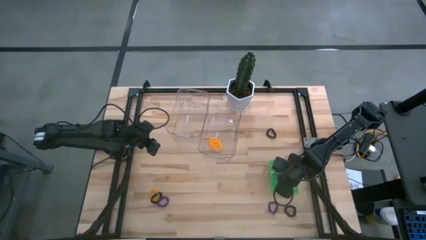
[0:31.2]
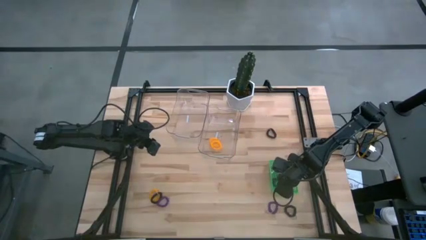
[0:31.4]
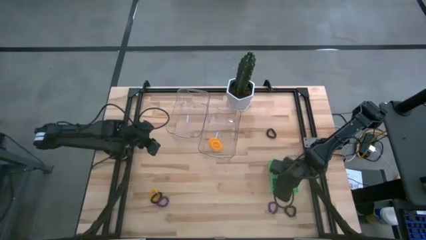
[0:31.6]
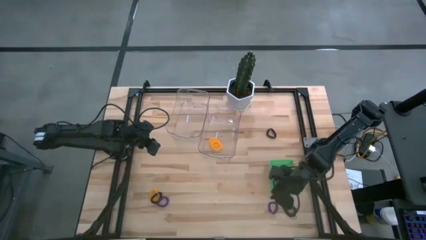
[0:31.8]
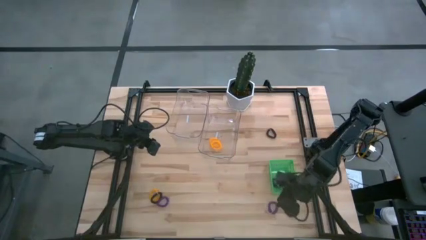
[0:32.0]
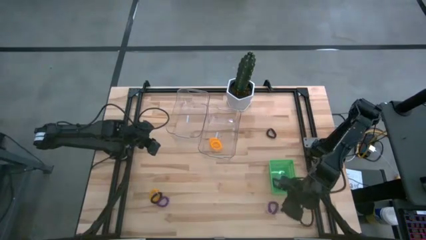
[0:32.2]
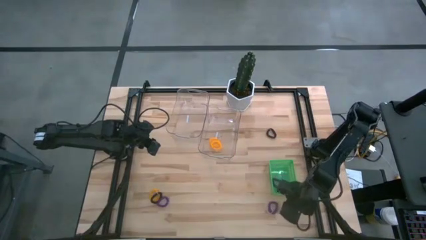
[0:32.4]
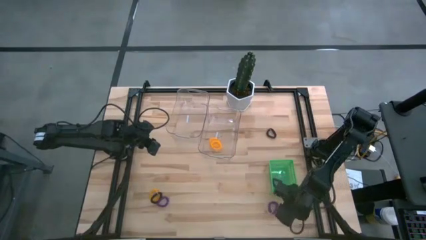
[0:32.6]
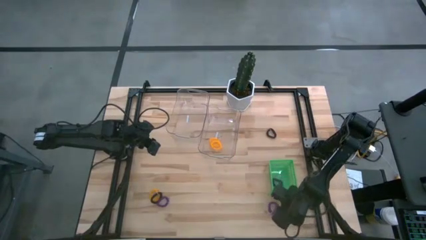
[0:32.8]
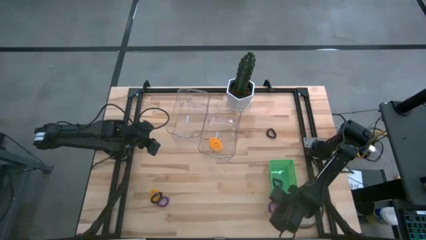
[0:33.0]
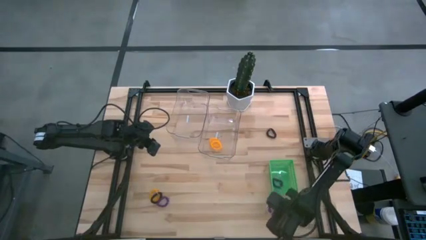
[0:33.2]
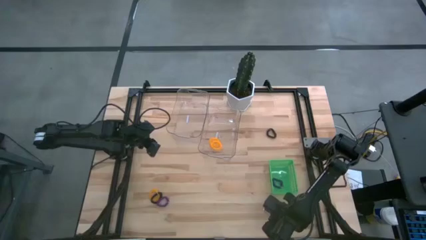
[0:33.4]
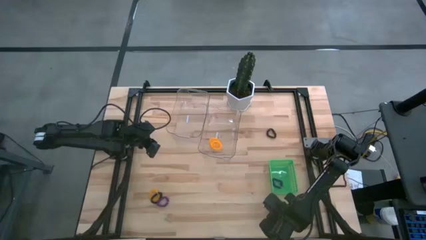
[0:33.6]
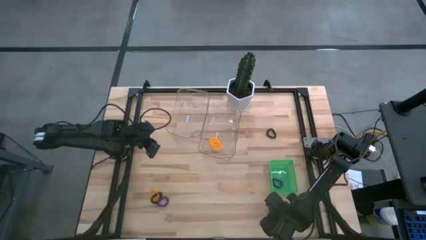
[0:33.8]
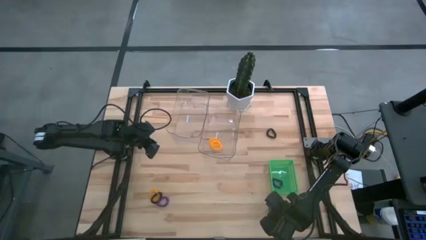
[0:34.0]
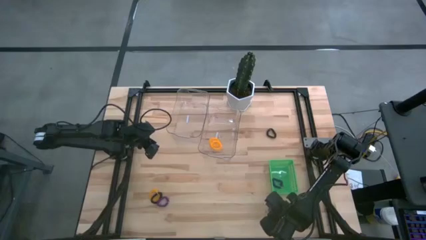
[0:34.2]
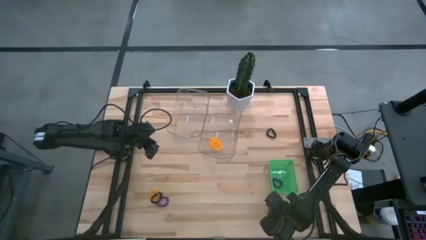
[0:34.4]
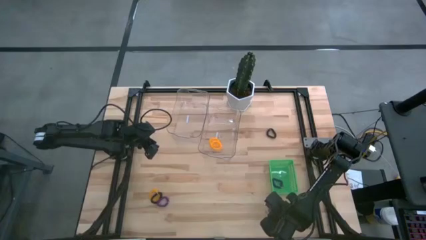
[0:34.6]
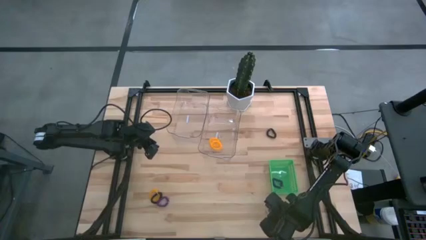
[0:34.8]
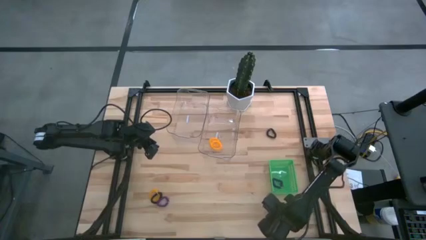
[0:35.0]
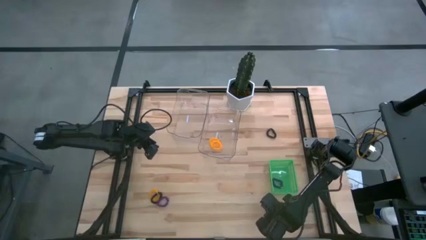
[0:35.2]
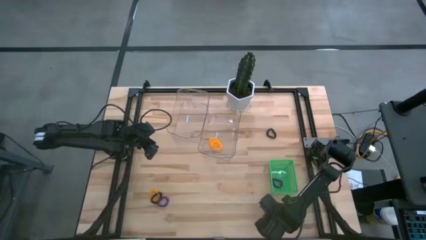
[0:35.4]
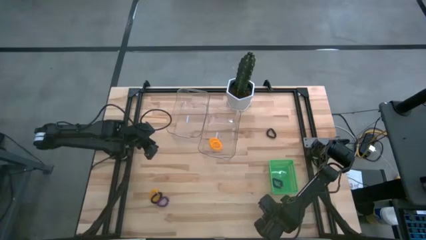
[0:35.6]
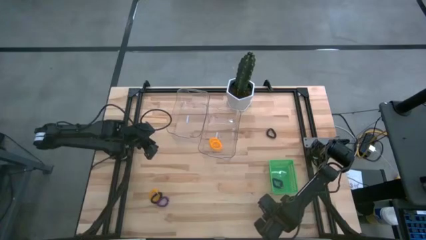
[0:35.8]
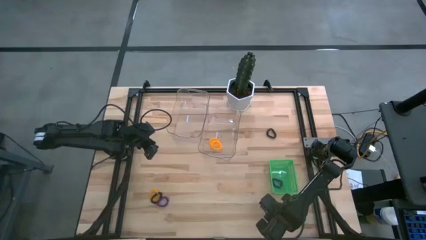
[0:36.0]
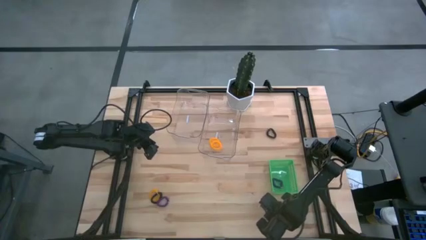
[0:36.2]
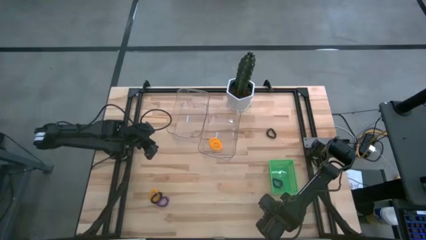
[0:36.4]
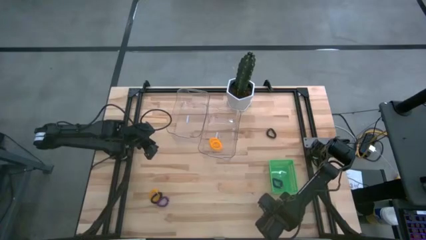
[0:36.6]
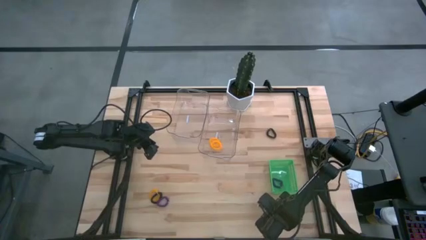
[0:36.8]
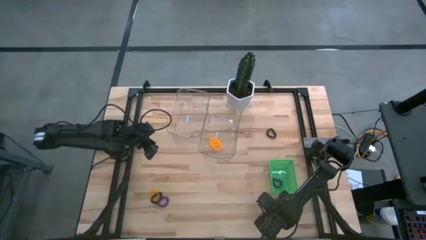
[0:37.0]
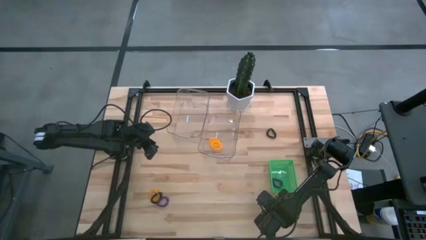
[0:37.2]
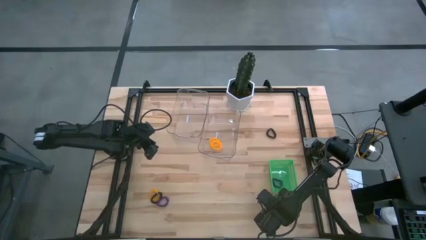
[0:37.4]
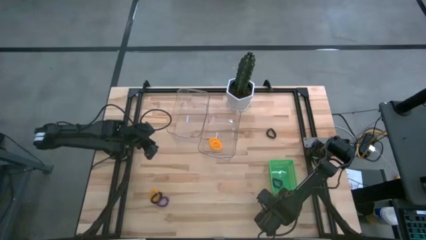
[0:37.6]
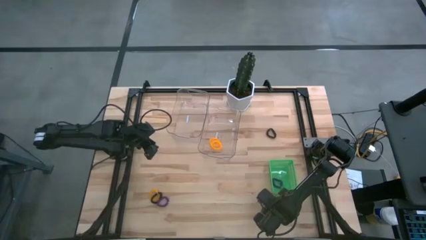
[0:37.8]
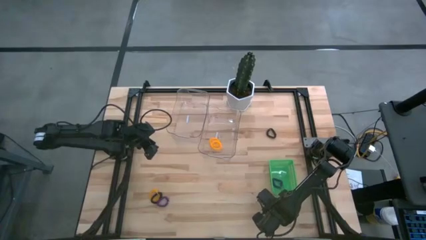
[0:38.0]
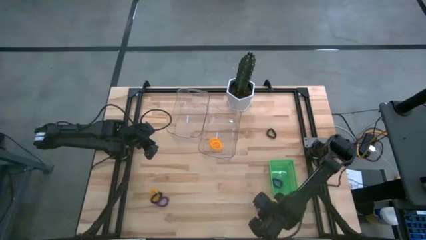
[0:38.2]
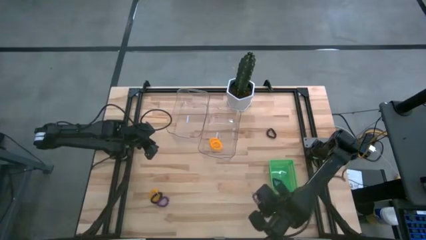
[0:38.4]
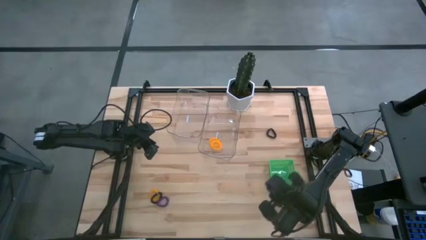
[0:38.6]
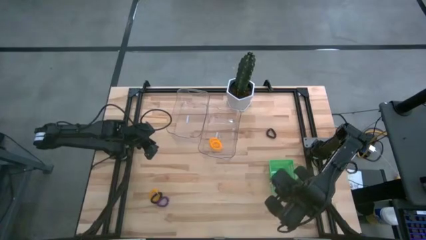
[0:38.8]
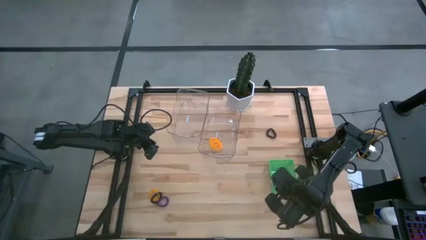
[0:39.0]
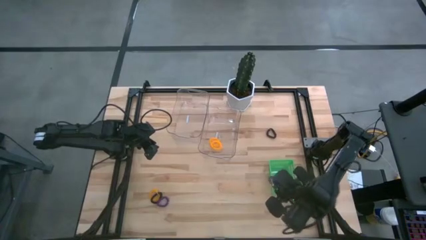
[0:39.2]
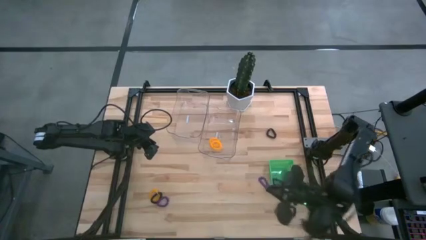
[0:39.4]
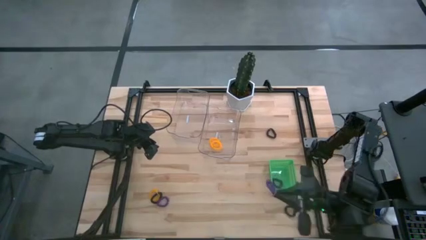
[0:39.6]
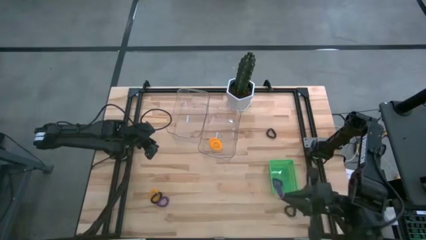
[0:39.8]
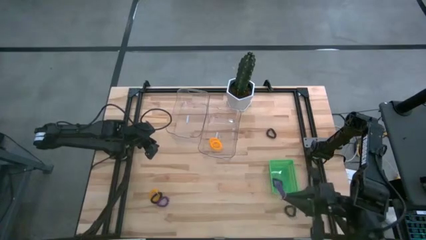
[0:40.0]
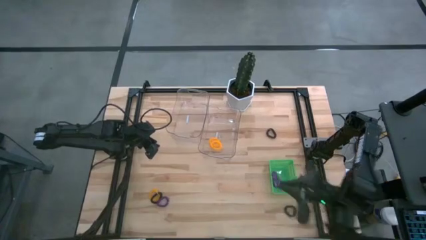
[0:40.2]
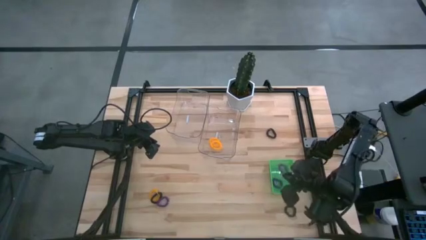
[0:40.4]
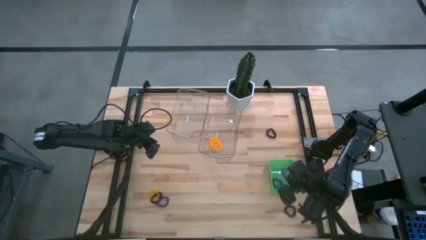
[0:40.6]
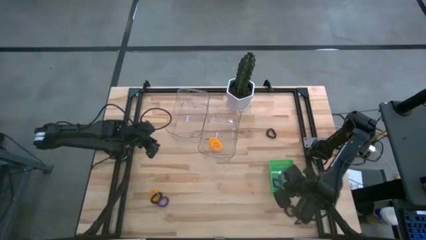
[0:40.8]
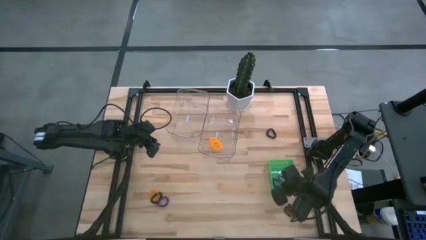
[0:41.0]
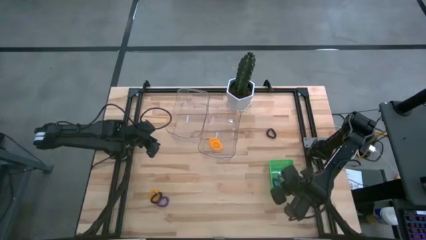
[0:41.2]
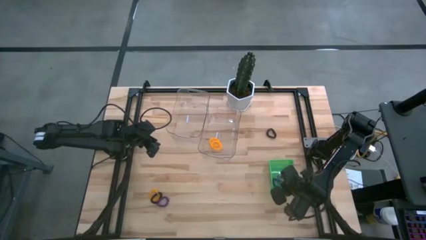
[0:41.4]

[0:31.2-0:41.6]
Task: Sort spring keychains
Put the right violet spring keychain into the green bin
